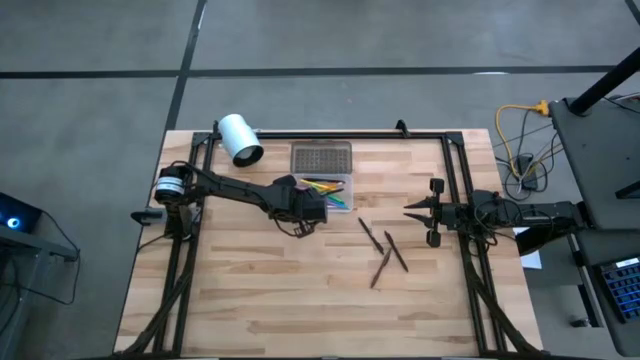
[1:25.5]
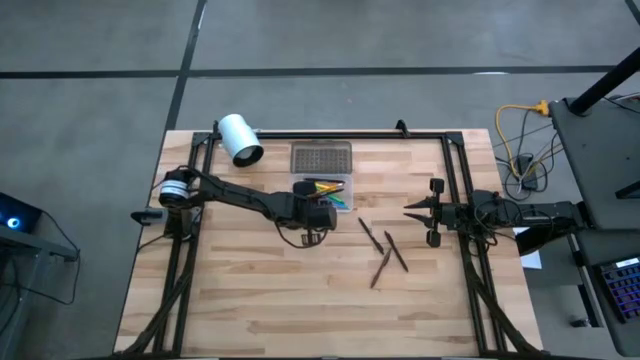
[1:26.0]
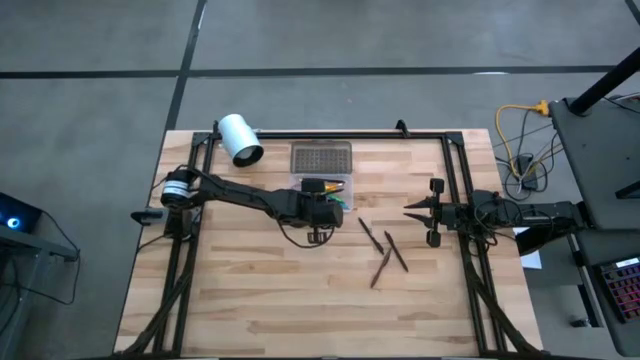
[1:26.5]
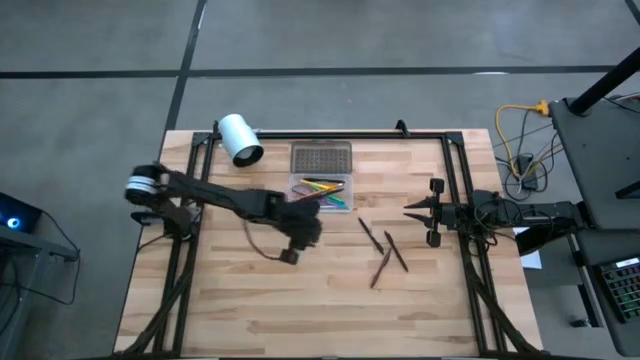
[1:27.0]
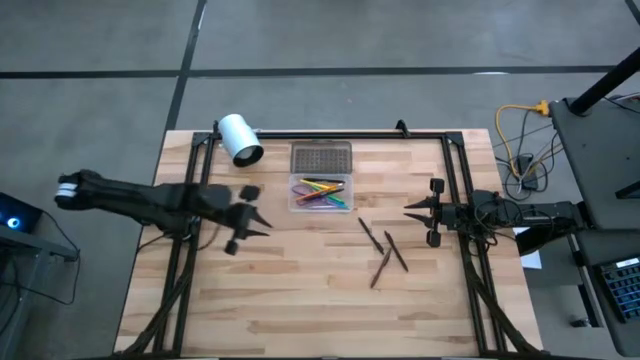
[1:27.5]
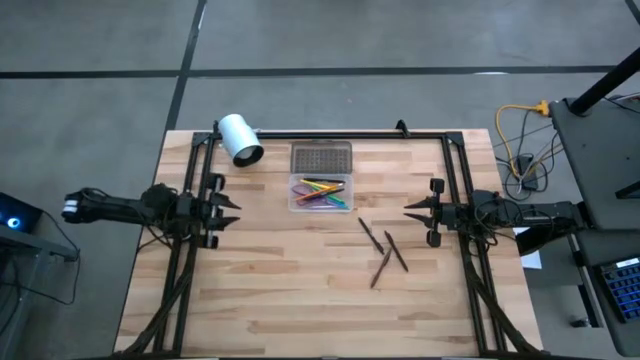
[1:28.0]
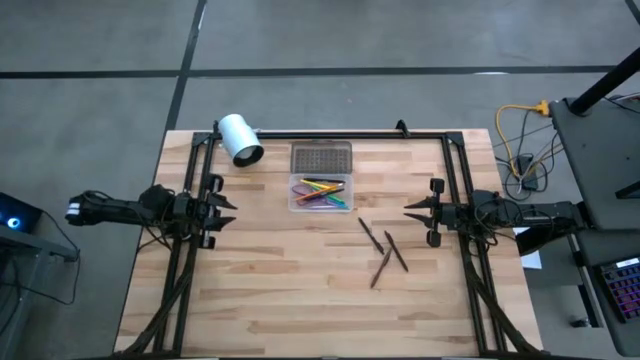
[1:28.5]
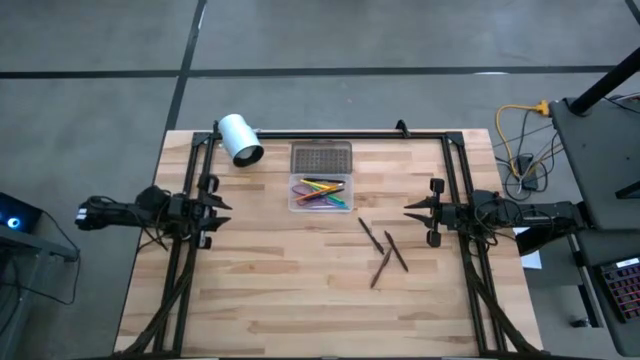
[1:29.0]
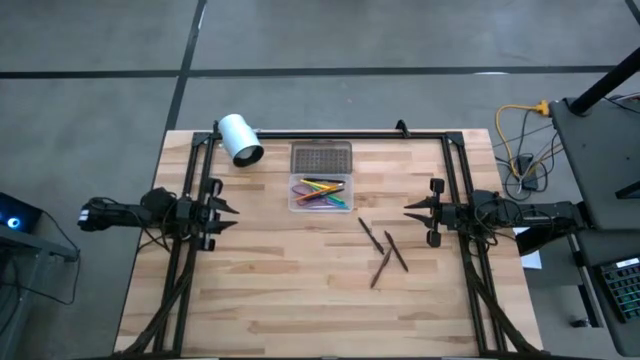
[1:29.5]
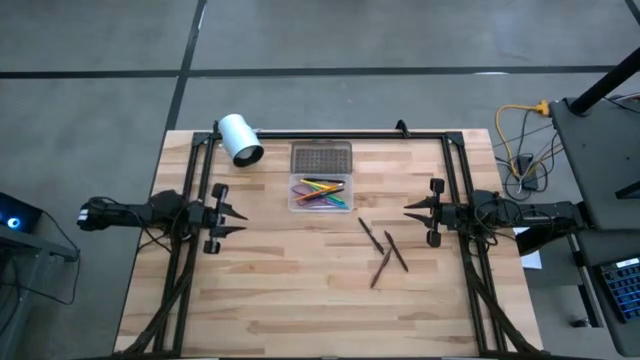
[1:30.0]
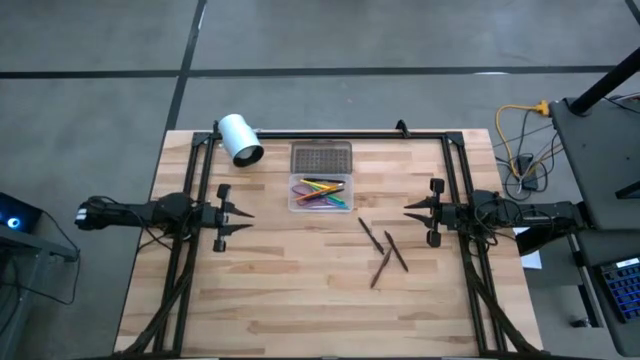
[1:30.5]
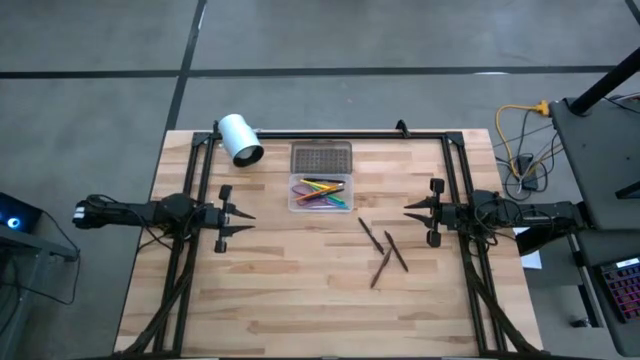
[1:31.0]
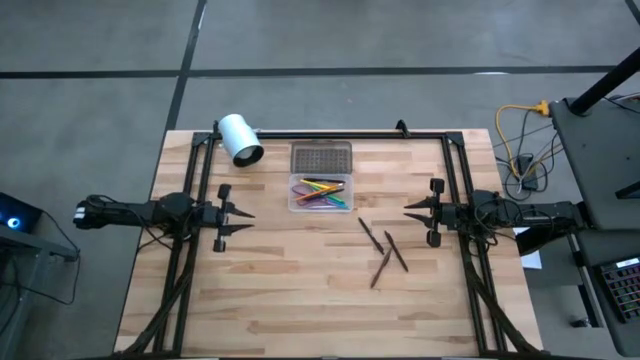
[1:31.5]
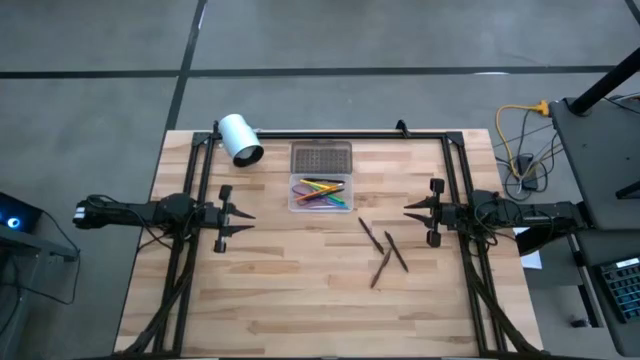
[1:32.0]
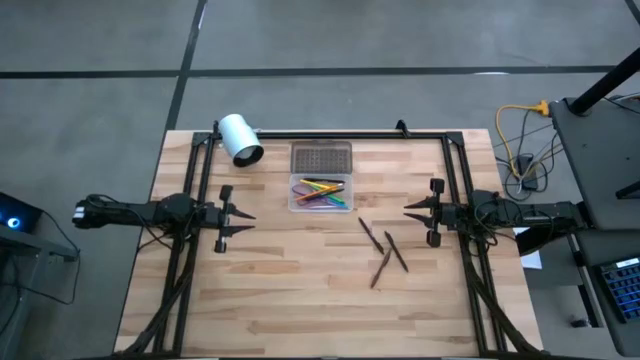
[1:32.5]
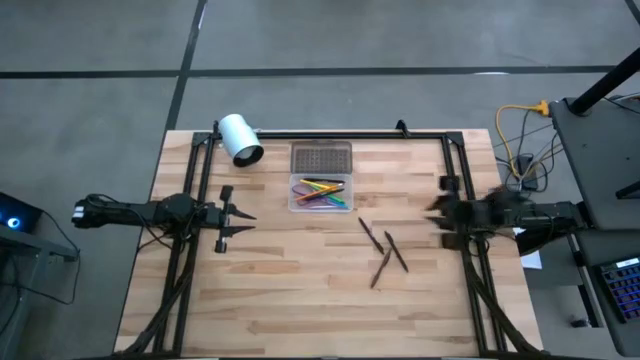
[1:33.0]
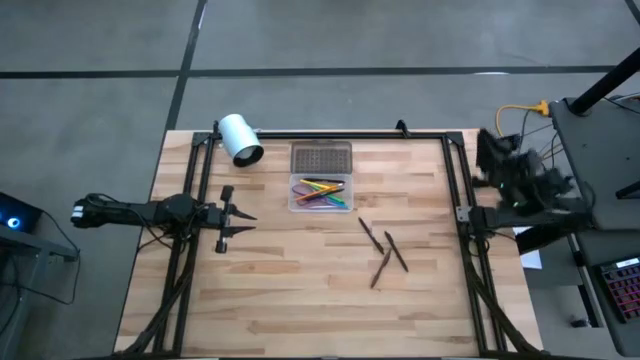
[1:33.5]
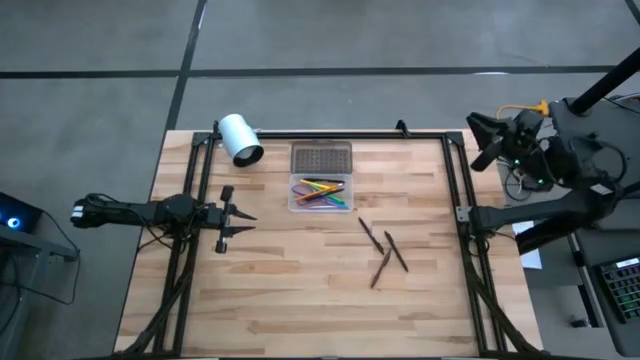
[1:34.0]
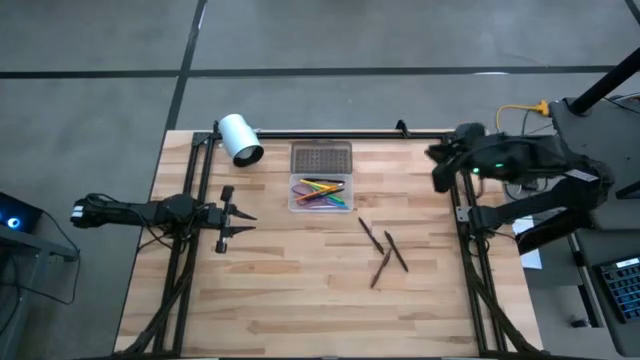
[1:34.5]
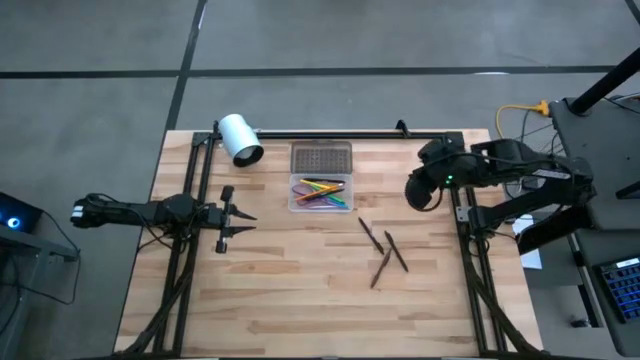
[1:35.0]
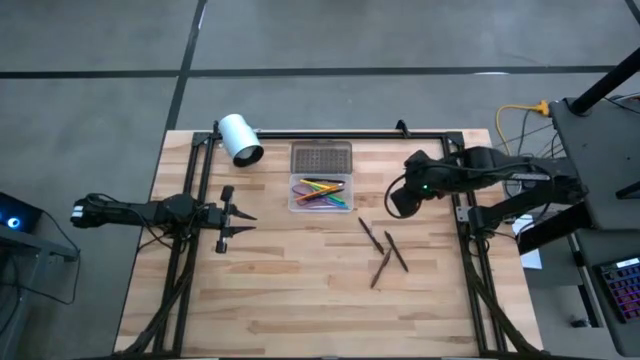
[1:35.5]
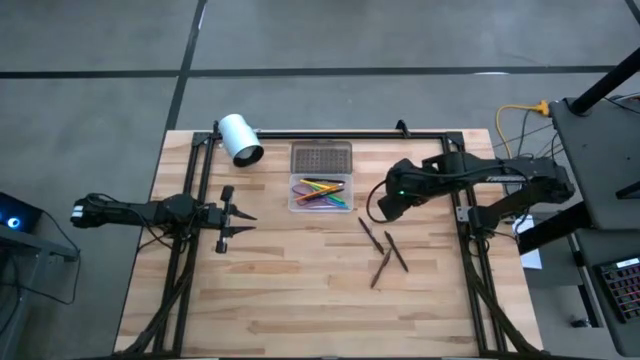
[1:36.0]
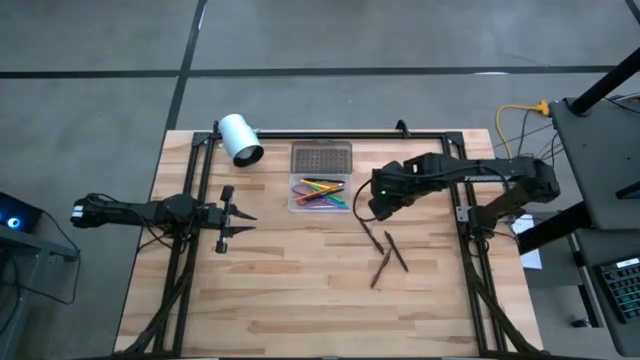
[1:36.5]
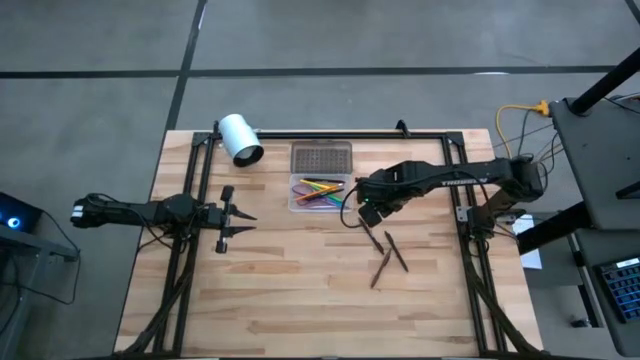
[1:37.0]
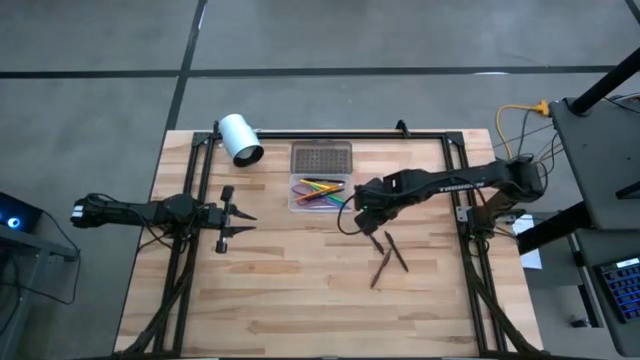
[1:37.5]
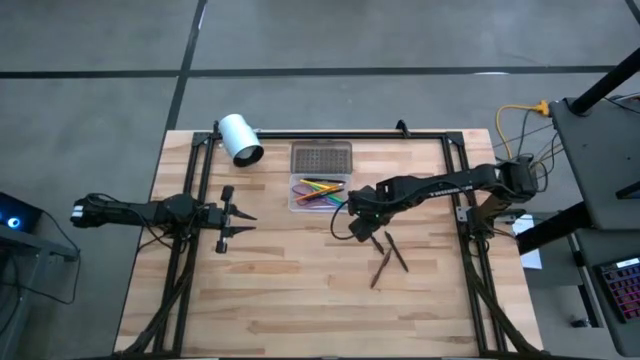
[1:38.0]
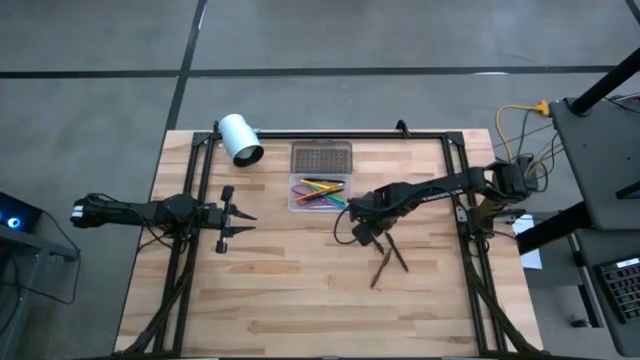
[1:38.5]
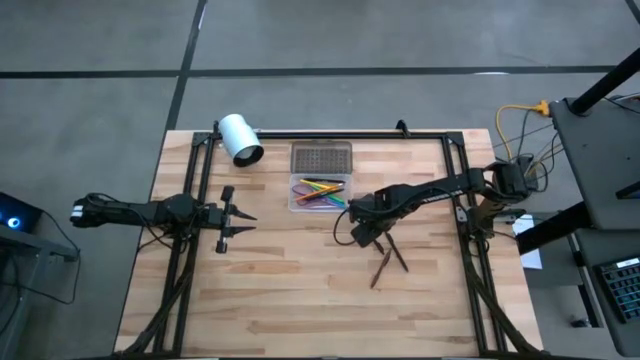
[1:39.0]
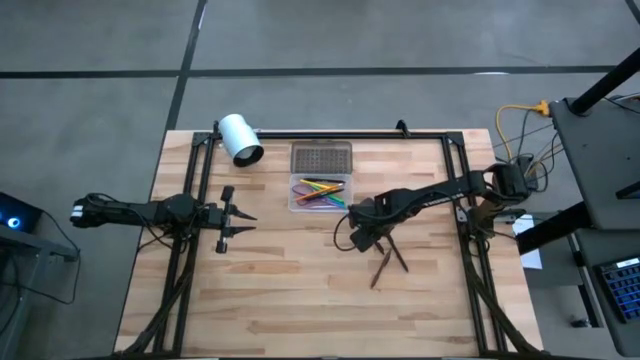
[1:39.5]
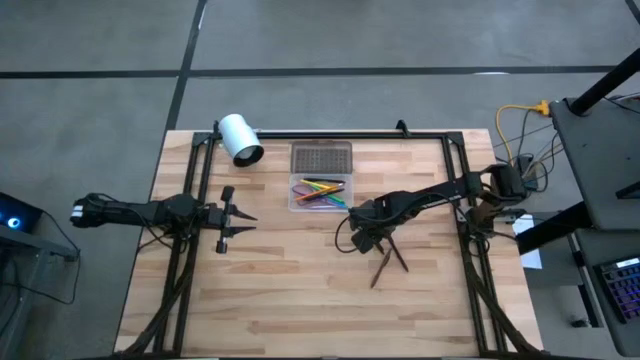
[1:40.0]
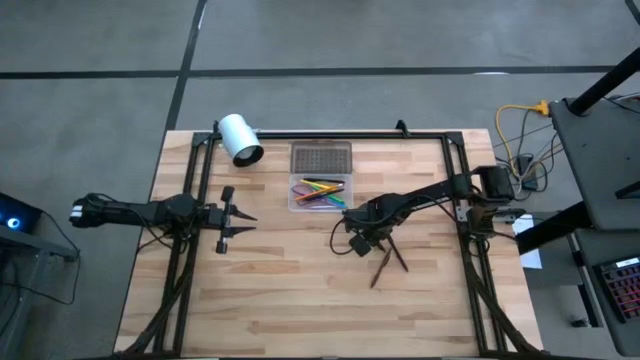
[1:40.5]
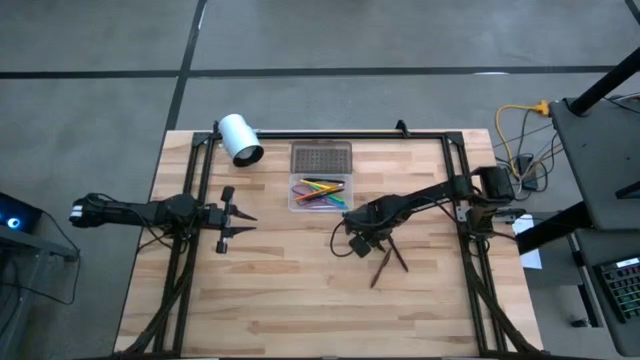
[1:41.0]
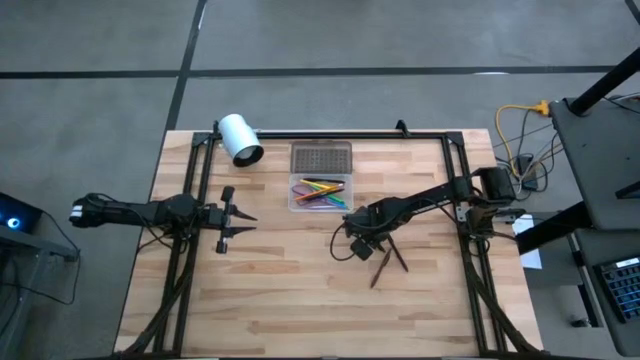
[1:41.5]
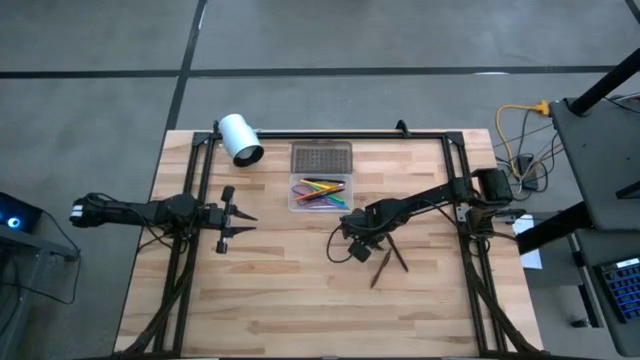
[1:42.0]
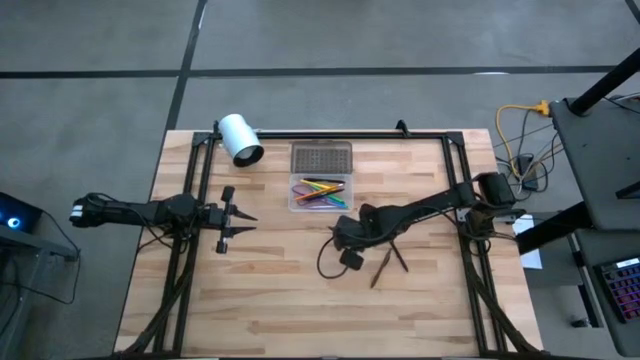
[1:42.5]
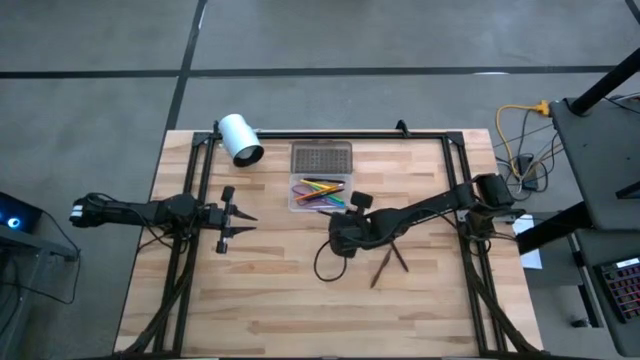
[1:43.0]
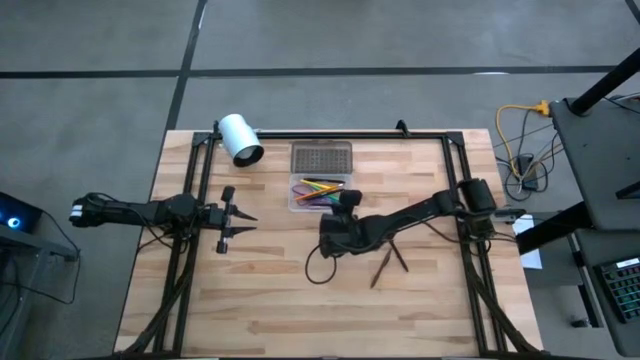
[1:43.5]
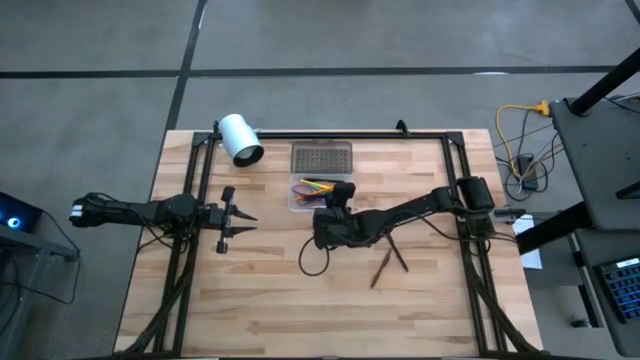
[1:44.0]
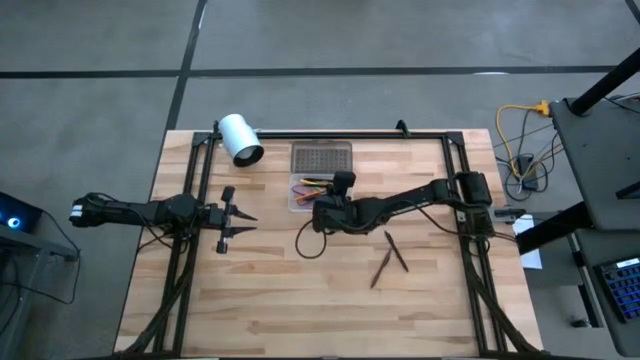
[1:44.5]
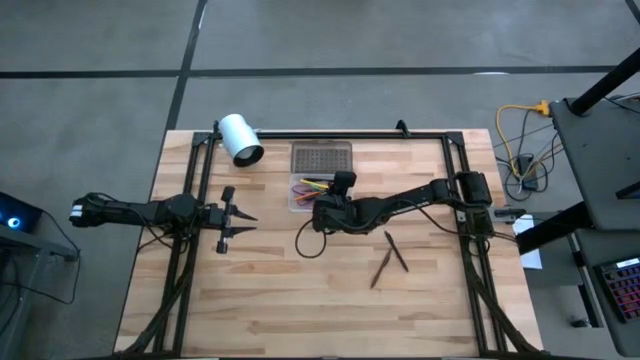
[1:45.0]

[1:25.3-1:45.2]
Task: Pick & place school supplies into a supply box
Put the black pen into the supply box

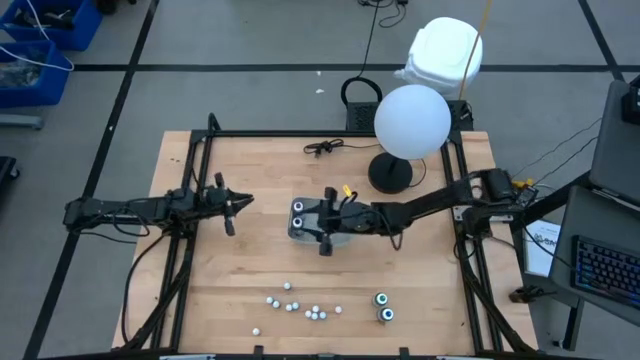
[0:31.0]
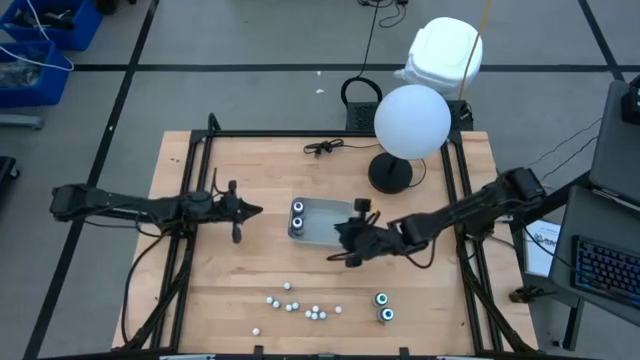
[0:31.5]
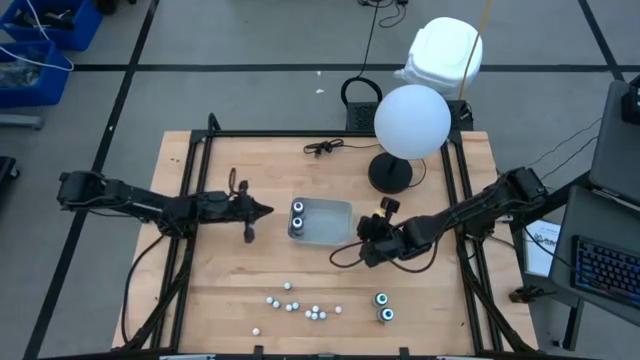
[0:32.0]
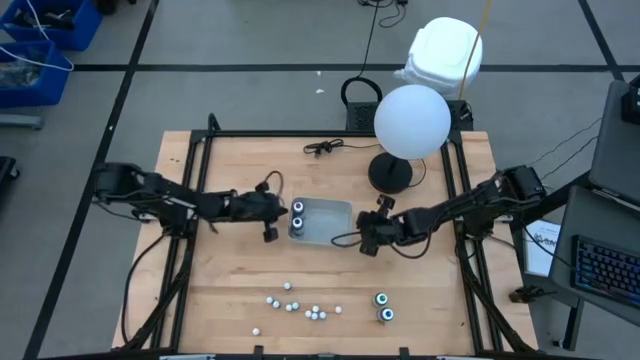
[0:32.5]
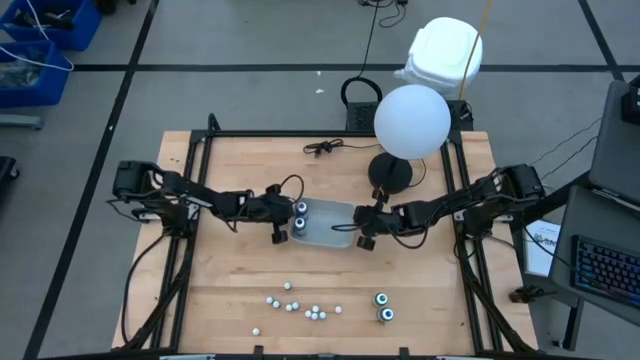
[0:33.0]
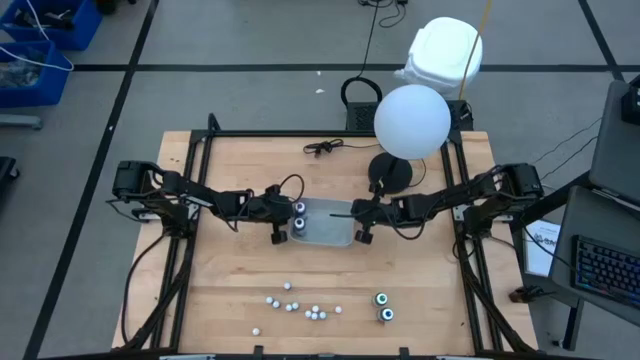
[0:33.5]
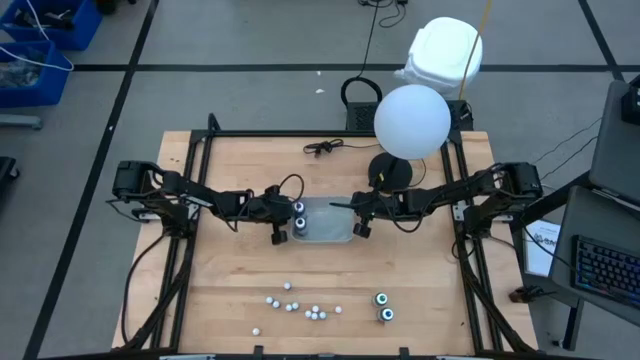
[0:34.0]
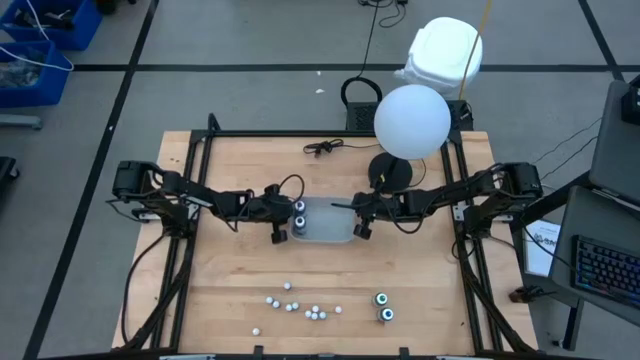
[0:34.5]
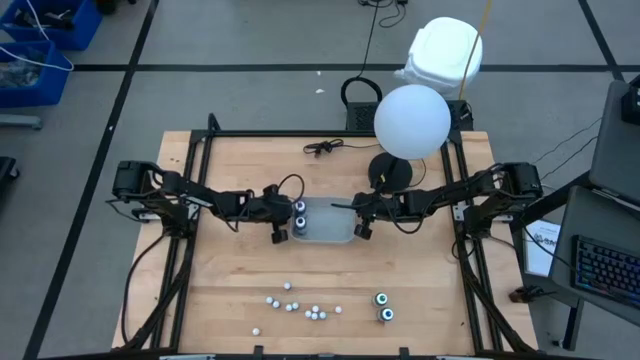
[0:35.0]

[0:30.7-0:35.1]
Task: Pick & Place food coloring
Adjust the gray bin on the table
